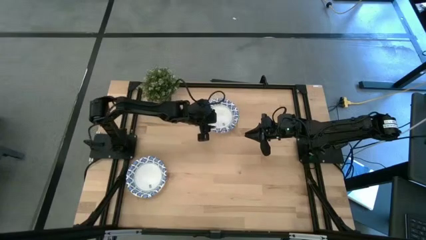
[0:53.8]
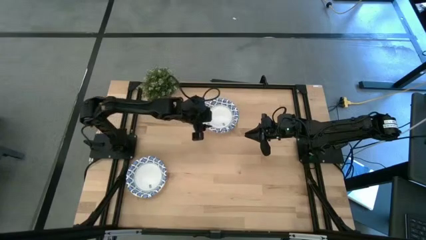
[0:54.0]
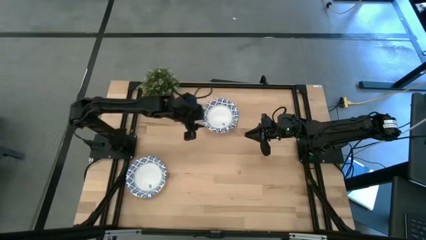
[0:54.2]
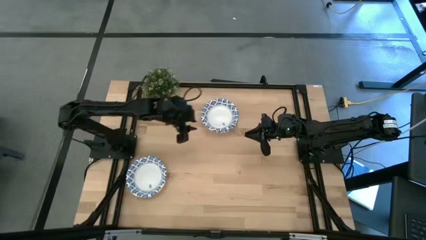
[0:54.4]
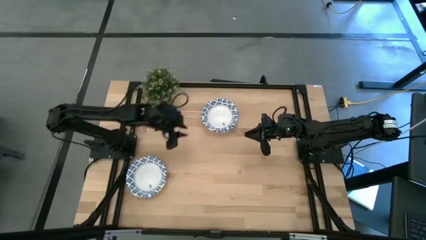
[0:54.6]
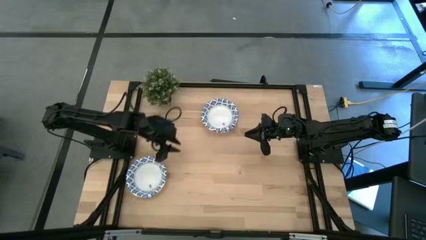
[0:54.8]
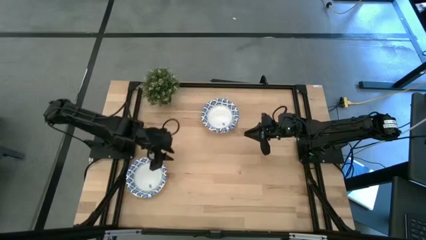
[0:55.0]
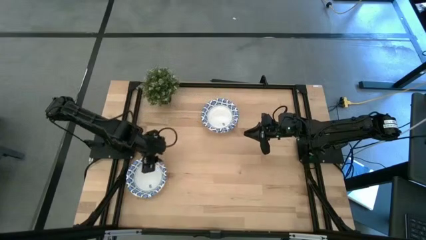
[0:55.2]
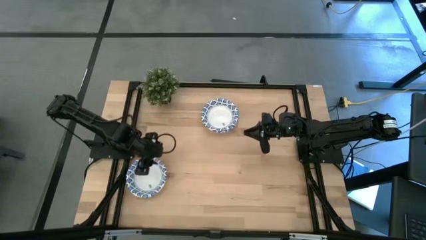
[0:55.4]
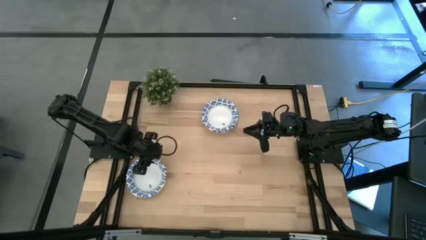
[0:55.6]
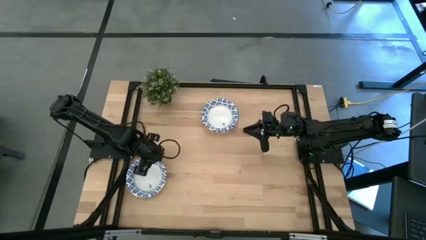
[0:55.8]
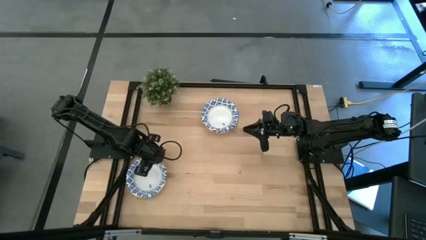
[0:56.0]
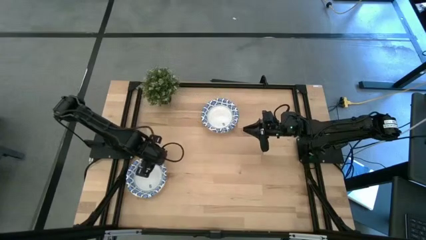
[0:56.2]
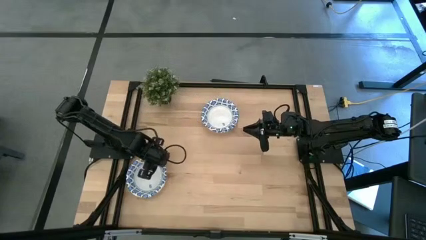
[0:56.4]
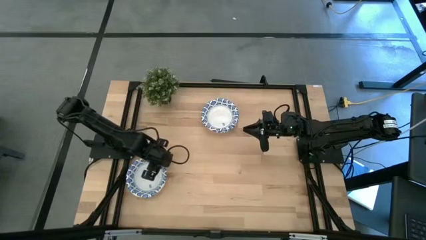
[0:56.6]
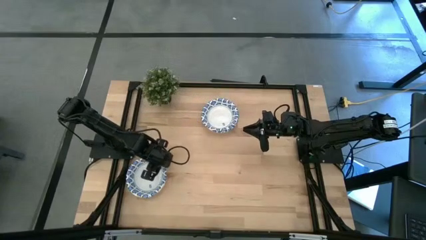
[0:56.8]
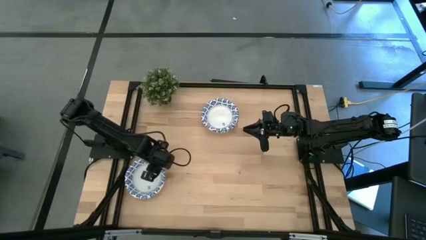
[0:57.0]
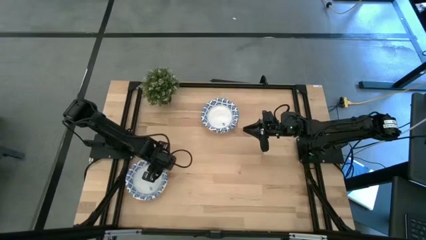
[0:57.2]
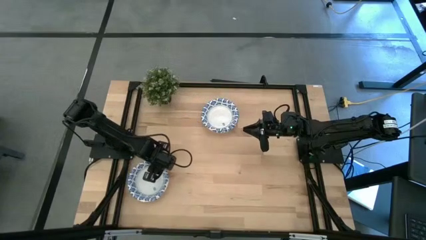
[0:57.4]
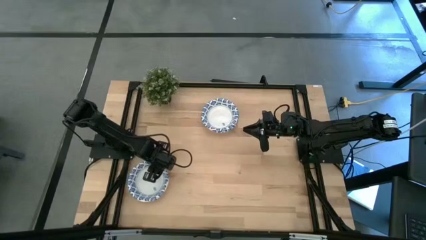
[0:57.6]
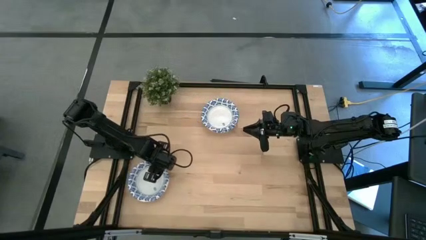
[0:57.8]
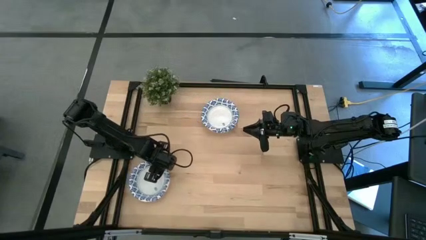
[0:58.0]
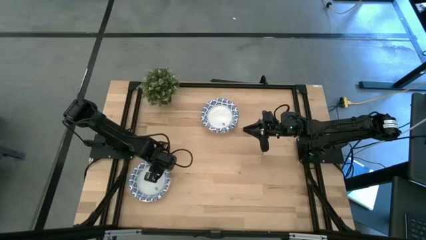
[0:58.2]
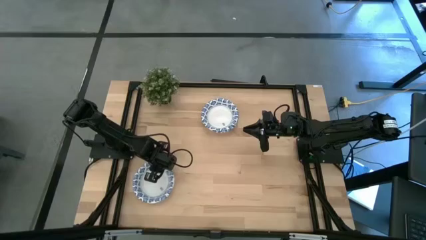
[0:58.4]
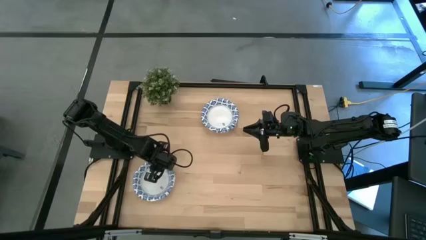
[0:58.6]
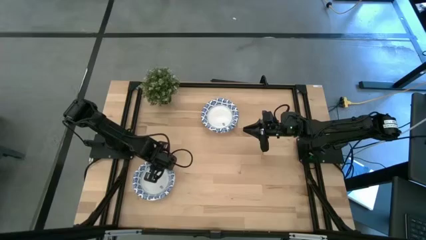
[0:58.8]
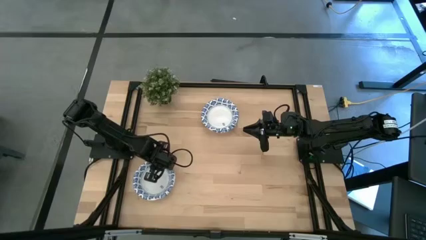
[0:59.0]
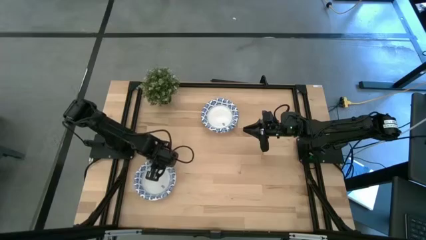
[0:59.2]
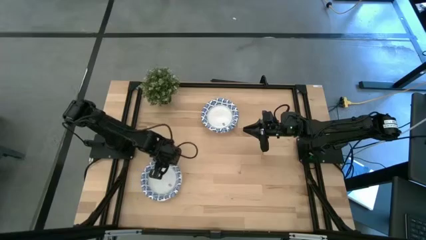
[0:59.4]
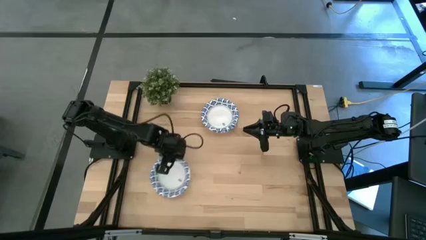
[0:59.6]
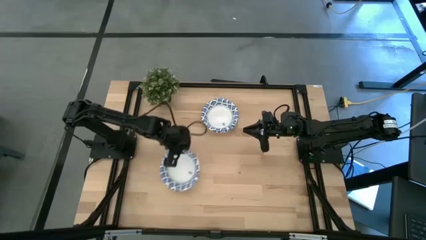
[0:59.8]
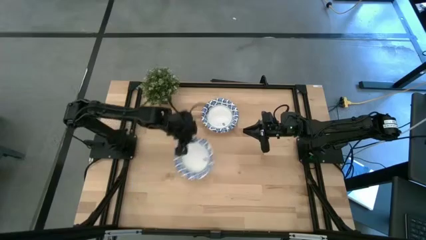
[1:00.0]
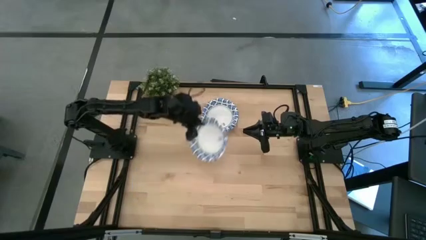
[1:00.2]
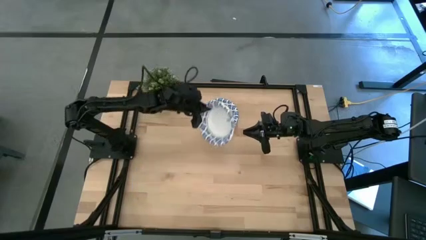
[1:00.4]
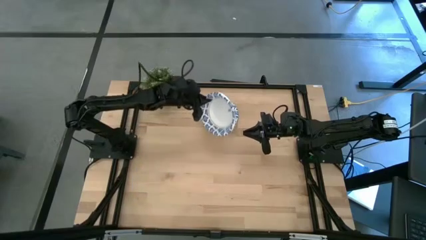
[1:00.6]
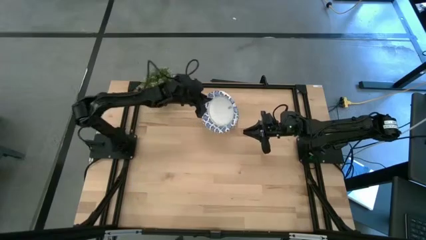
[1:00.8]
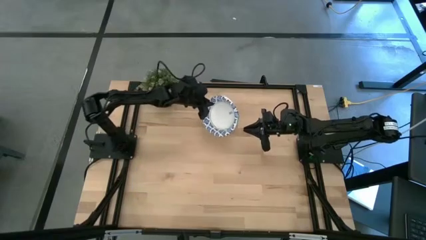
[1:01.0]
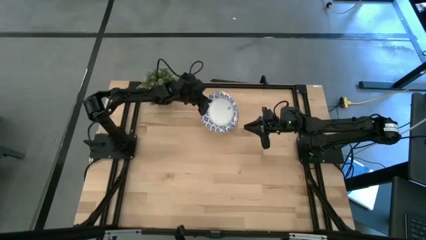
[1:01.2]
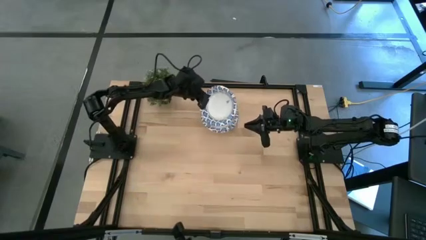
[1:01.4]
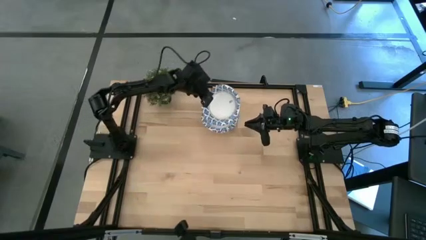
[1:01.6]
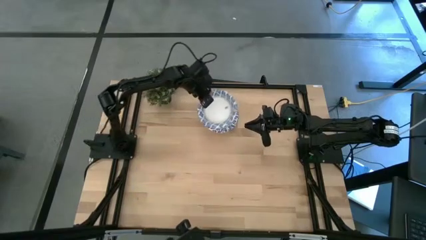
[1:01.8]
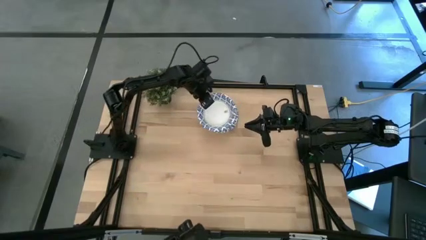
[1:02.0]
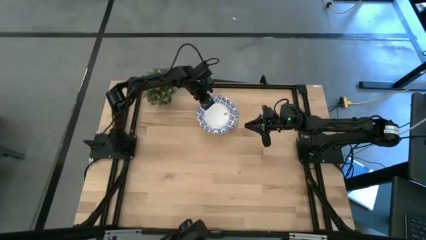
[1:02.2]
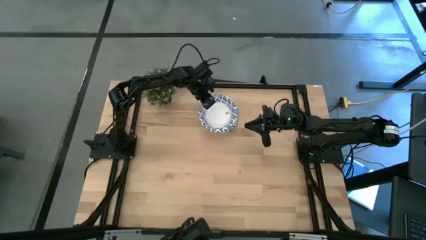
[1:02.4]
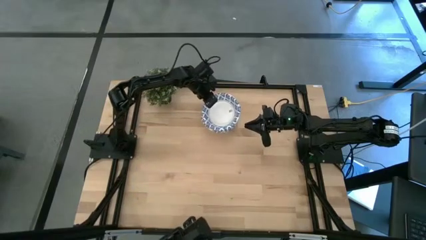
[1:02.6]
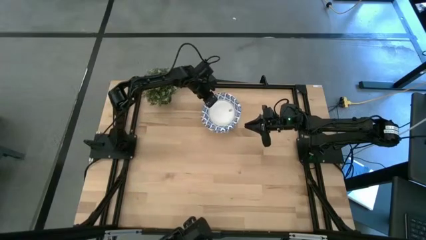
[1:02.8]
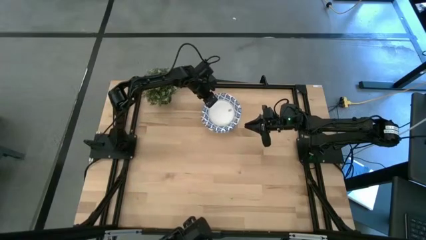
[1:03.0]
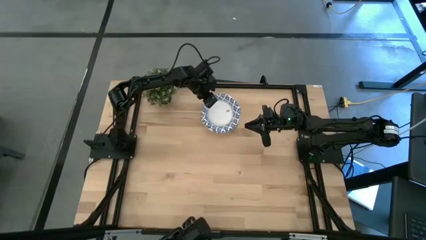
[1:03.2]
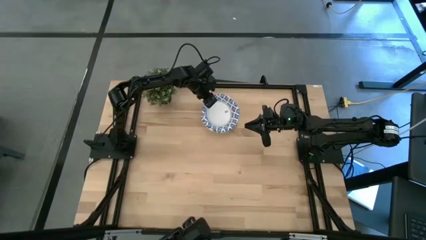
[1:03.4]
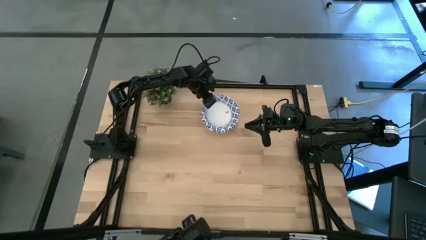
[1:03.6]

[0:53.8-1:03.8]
Task: Nest bowls inside each other
Stack the white bowl on the other white bowl

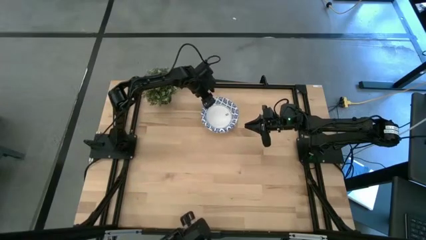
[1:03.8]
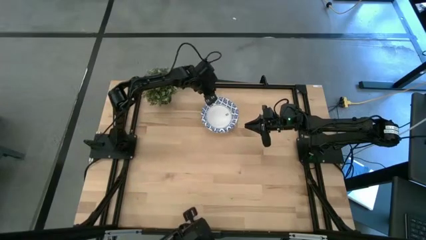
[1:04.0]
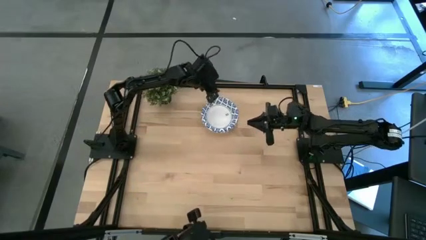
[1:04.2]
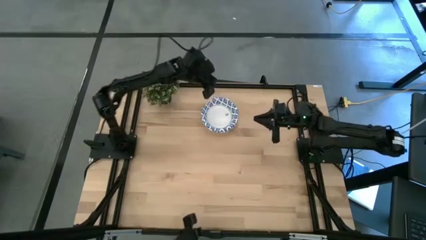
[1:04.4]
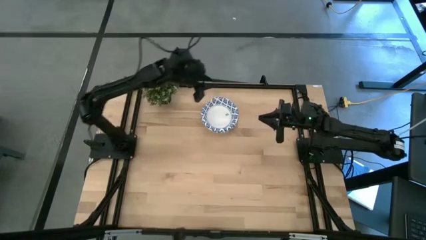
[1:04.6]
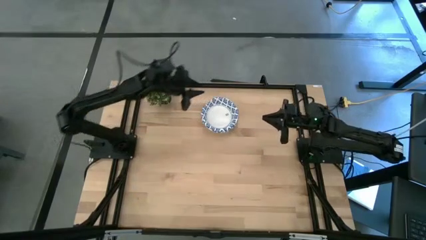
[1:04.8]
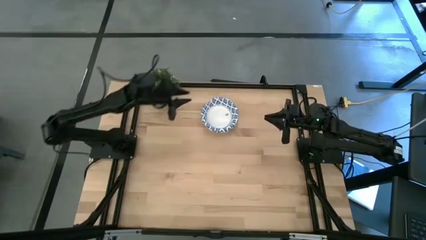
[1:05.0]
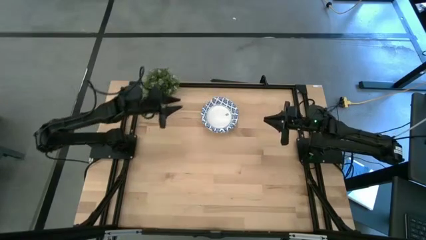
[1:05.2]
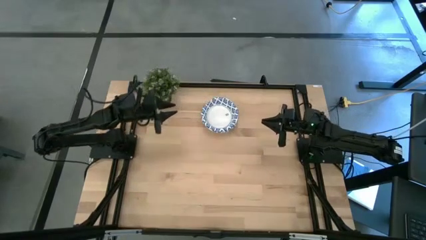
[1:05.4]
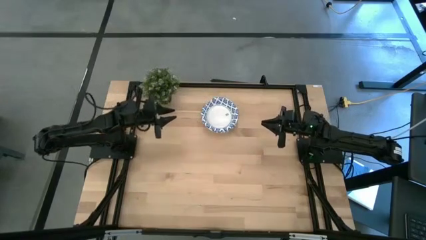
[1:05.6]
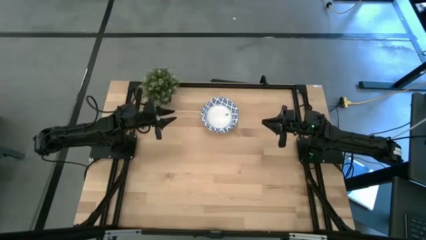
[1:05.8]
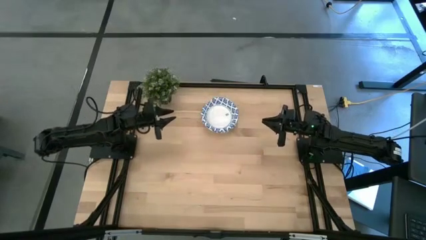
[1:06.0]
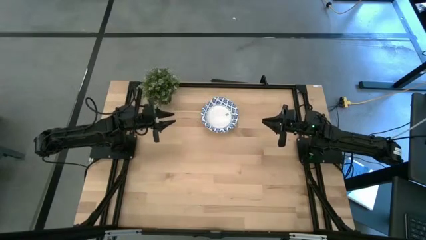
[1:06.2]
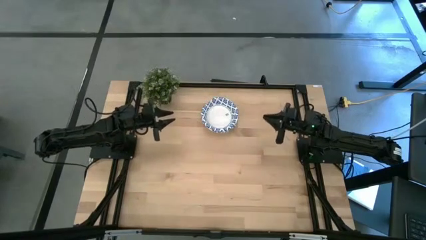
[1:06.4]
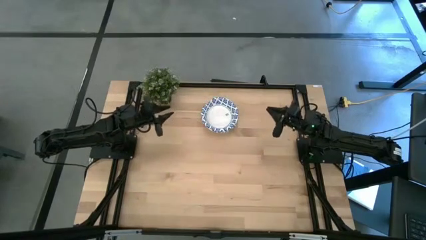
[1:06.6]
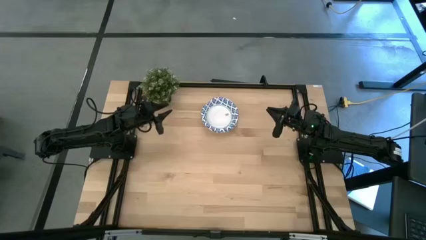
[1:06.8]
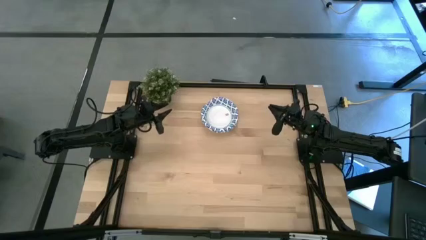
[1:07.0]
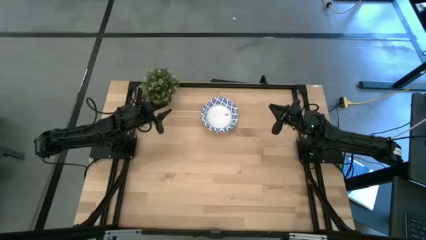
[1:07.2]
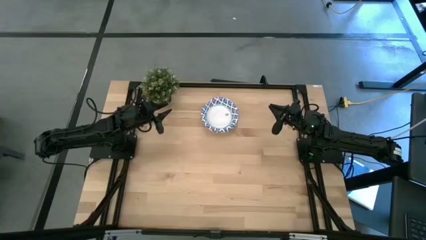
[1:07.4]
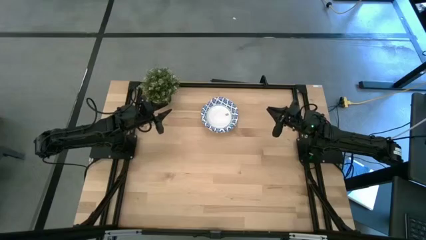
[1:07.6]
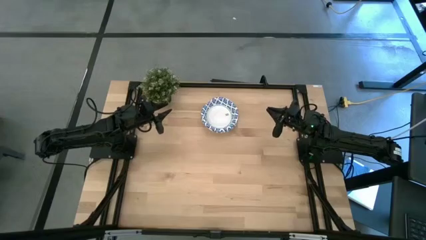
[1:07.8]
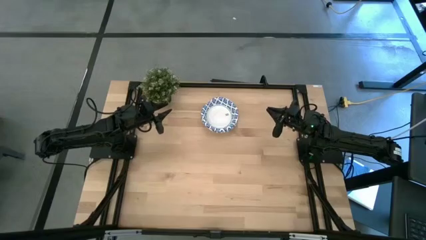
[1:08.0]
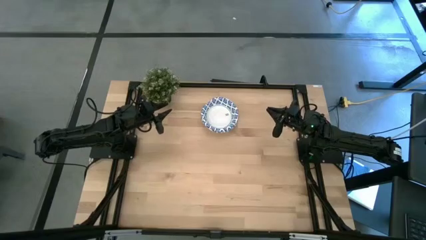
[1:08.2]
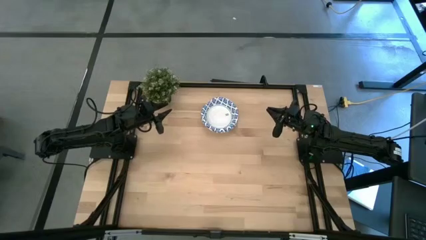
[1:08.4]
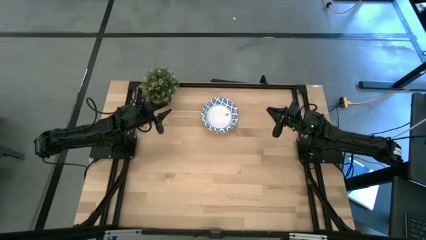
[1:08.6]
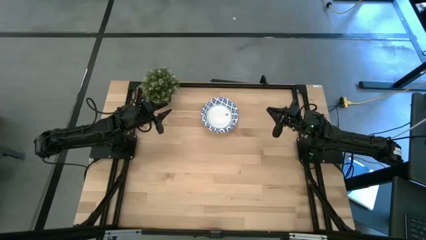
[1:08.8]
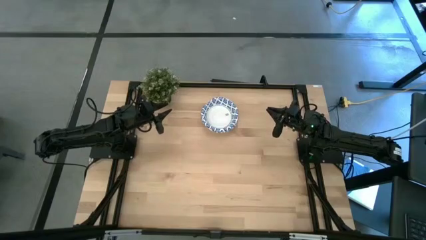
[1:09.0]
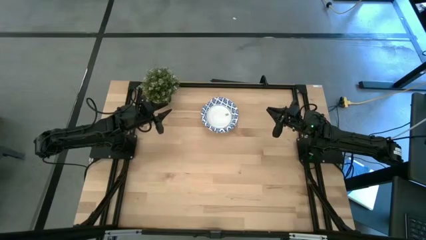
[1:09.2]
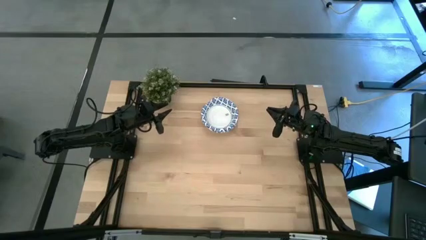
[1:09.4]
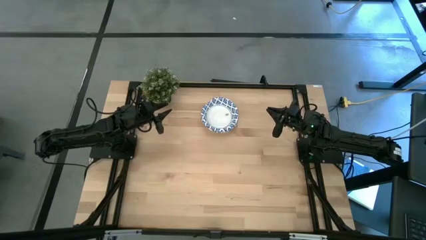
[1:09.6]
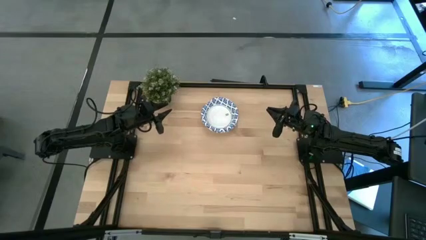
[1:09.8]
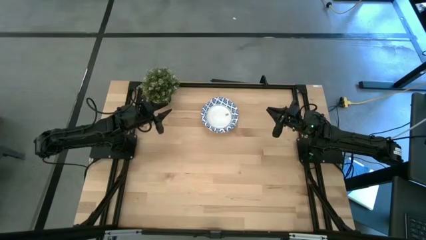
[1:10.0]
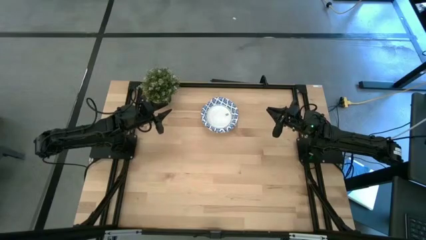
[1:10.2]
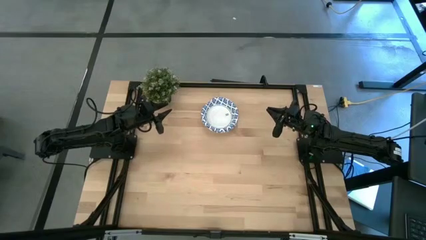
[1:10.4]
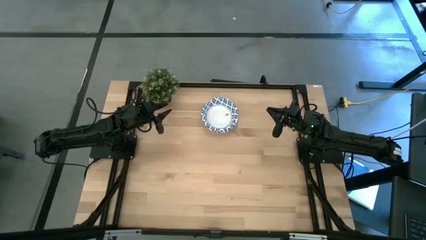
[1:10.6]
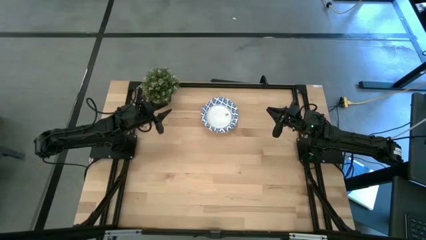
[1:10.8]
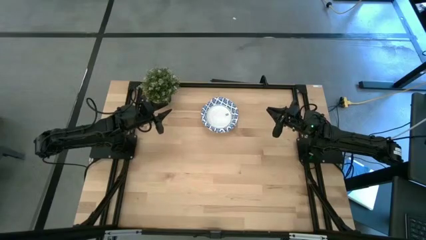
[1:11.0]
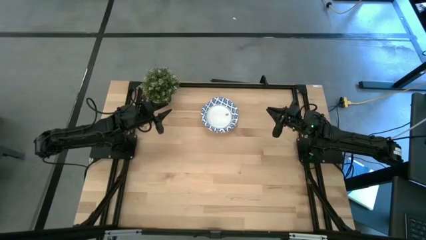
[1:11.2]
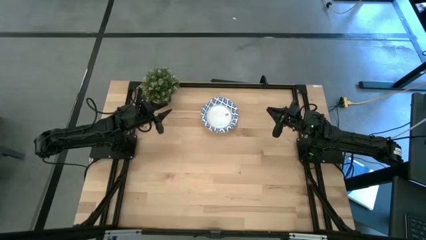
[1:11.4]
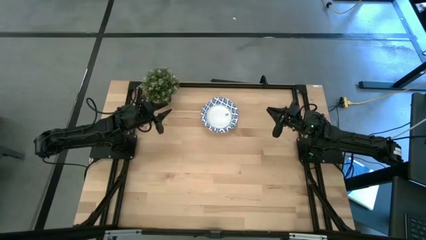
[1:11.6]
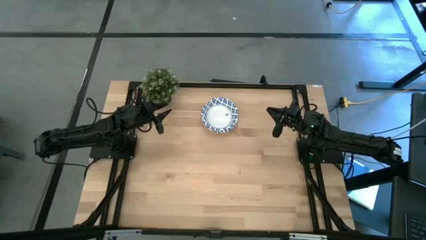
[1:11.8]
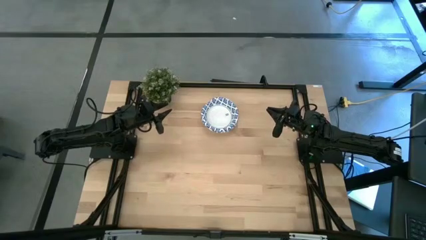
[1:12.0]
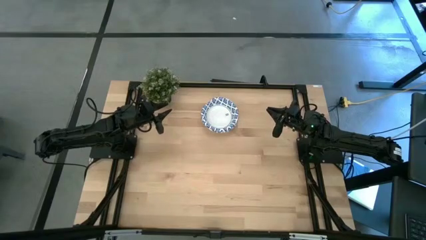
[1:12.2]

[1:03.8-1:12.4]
Return to Home Position
